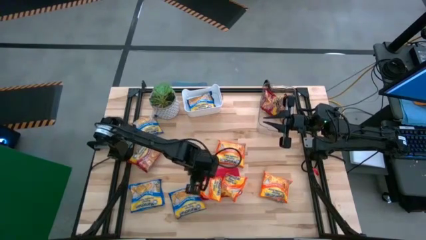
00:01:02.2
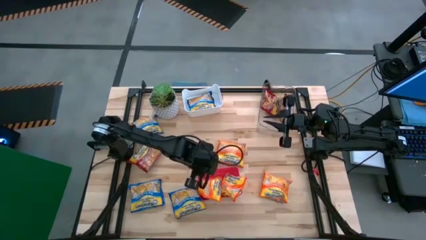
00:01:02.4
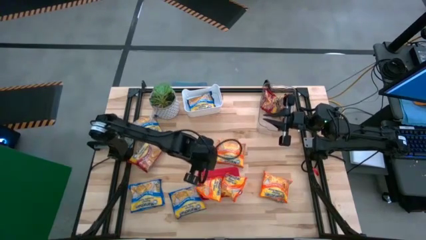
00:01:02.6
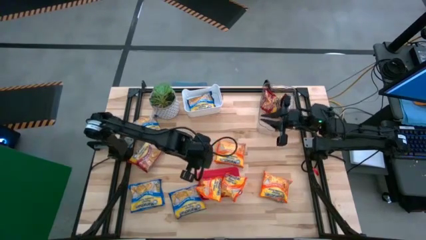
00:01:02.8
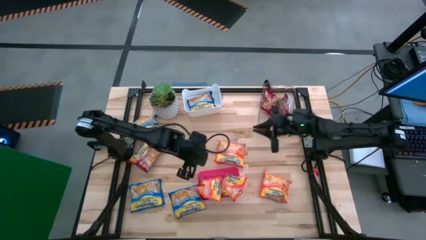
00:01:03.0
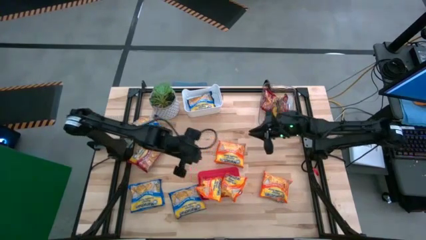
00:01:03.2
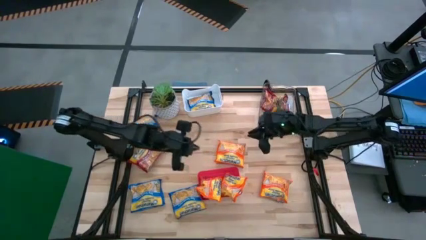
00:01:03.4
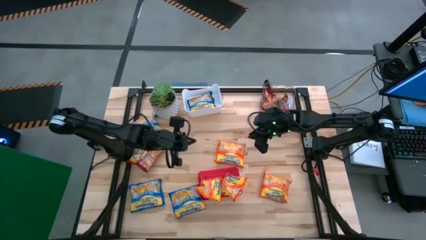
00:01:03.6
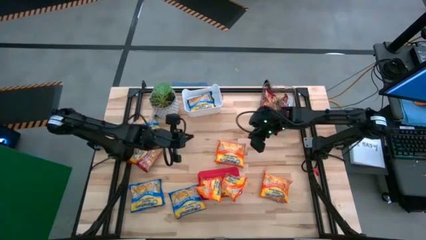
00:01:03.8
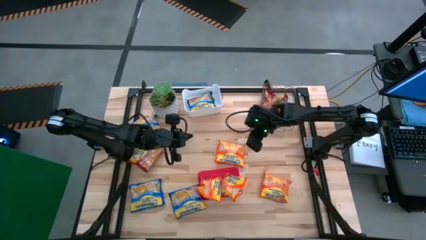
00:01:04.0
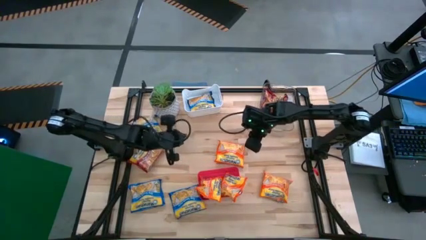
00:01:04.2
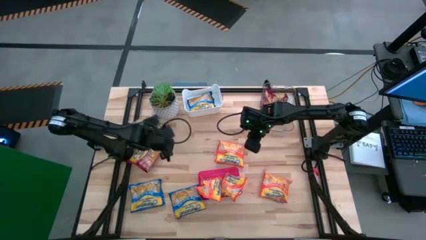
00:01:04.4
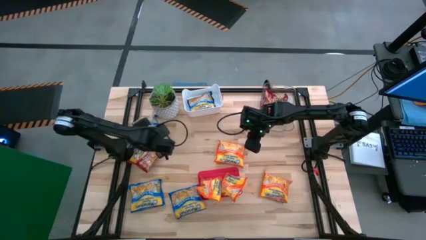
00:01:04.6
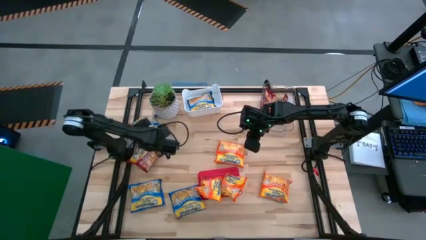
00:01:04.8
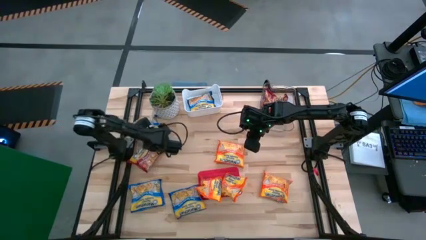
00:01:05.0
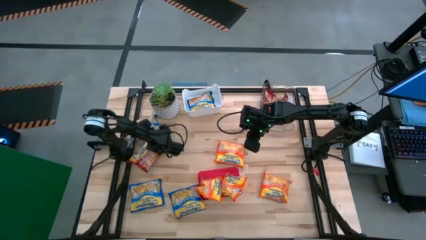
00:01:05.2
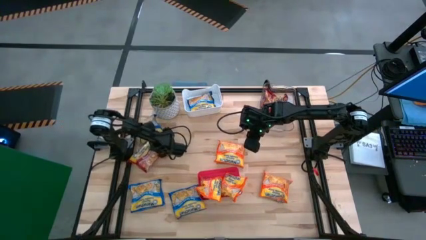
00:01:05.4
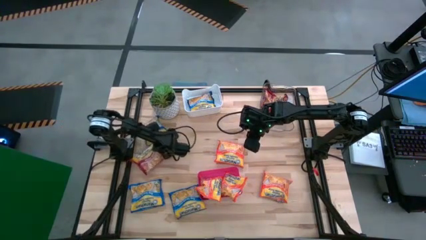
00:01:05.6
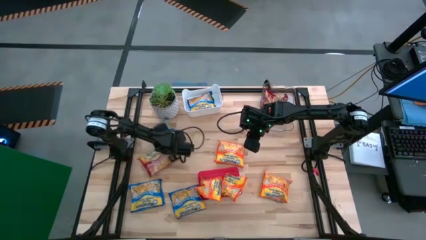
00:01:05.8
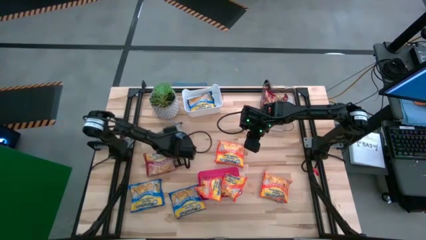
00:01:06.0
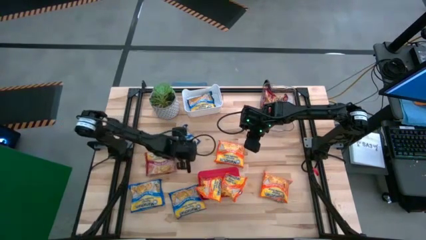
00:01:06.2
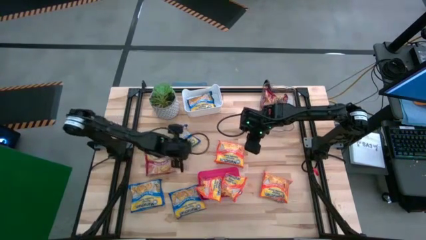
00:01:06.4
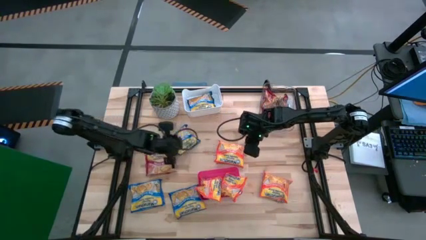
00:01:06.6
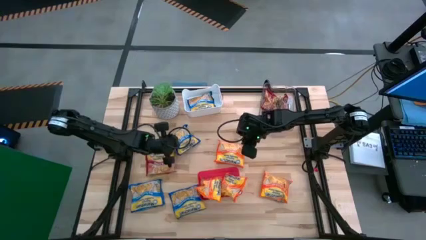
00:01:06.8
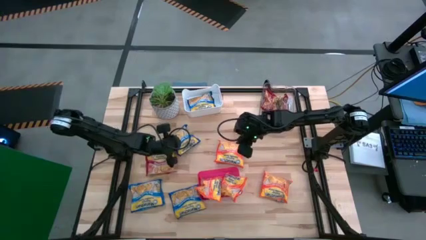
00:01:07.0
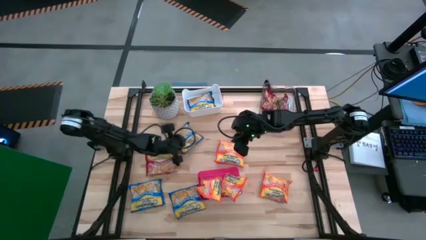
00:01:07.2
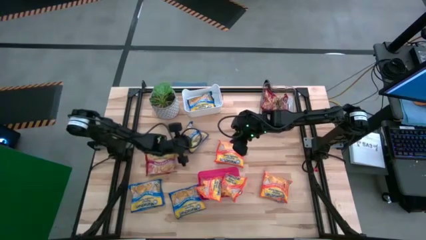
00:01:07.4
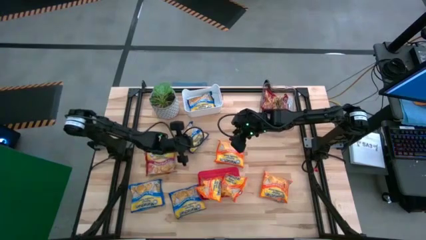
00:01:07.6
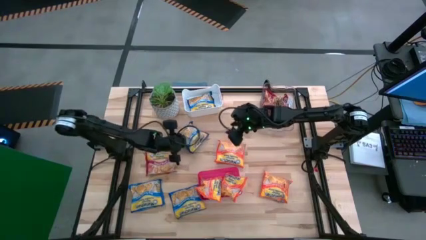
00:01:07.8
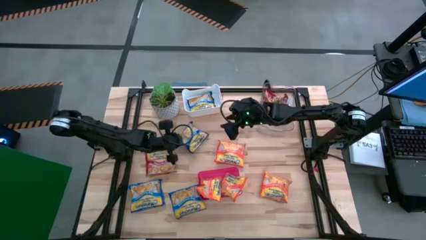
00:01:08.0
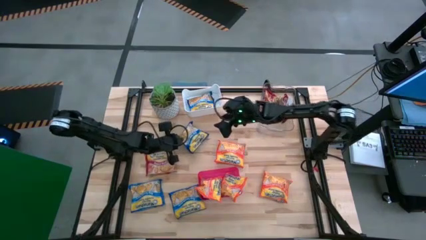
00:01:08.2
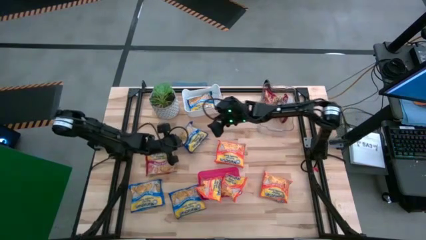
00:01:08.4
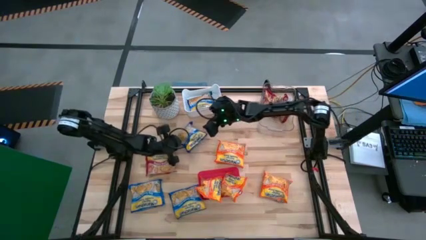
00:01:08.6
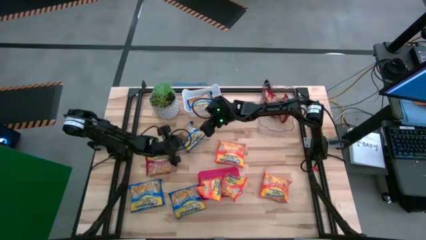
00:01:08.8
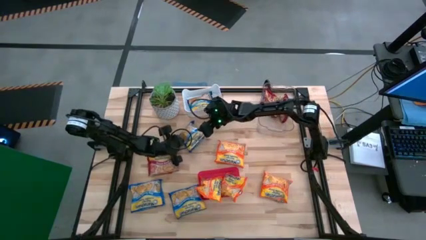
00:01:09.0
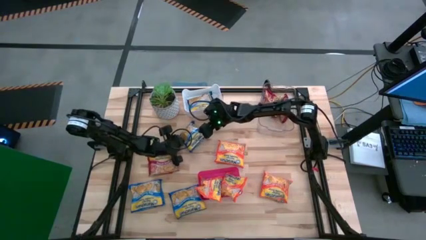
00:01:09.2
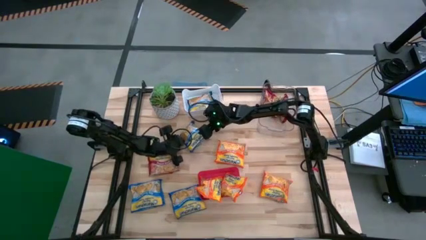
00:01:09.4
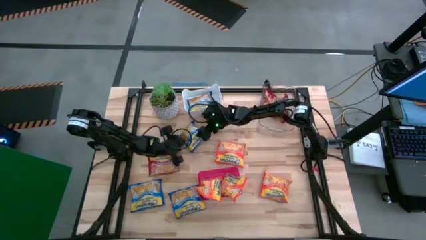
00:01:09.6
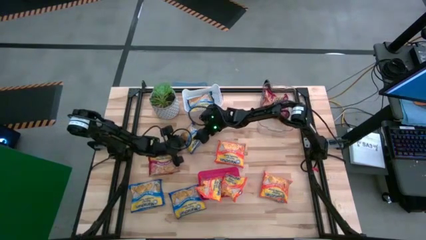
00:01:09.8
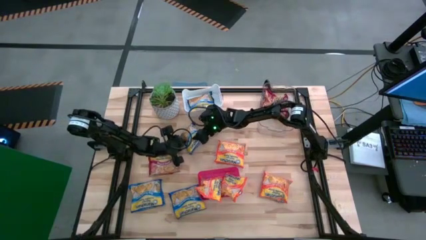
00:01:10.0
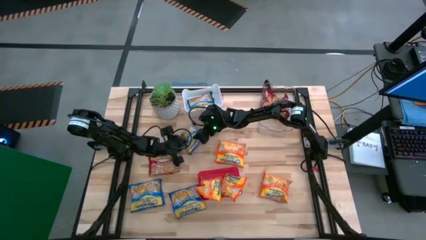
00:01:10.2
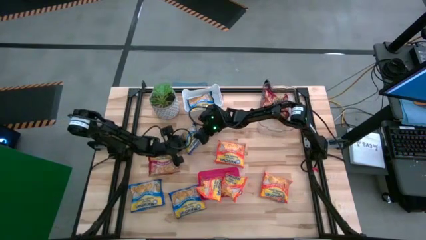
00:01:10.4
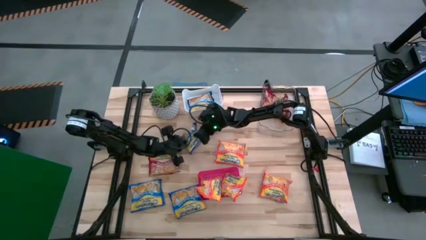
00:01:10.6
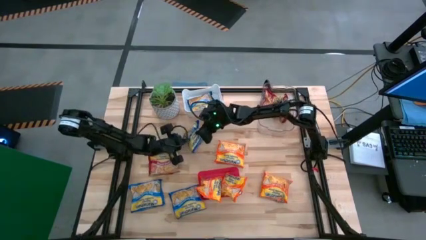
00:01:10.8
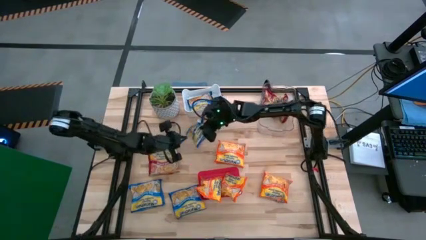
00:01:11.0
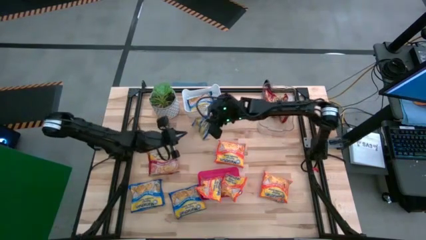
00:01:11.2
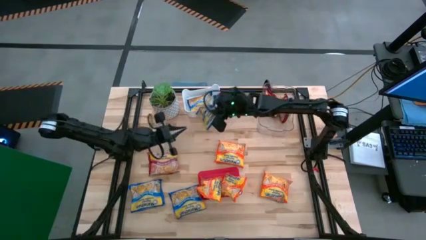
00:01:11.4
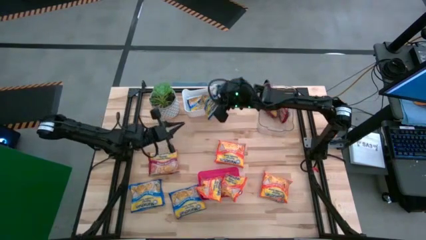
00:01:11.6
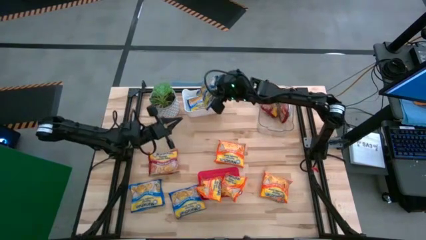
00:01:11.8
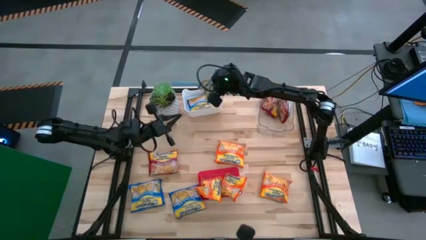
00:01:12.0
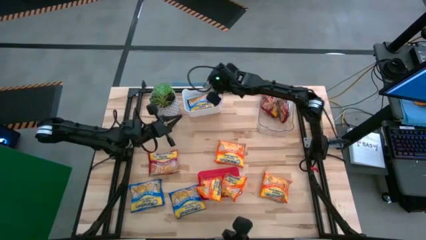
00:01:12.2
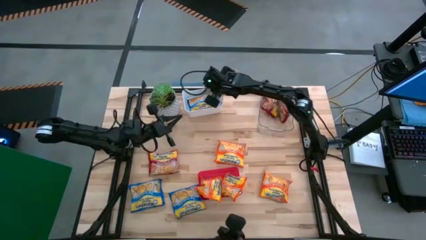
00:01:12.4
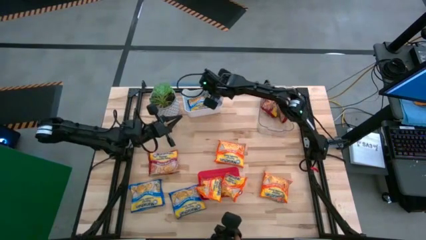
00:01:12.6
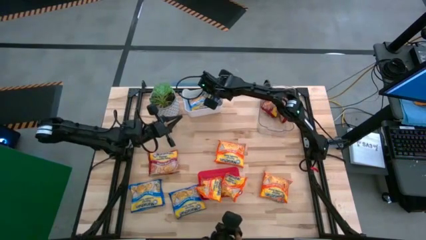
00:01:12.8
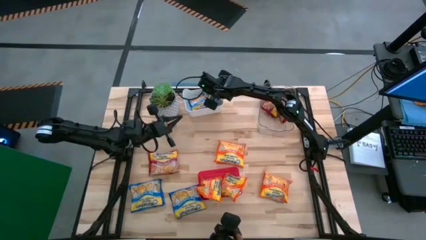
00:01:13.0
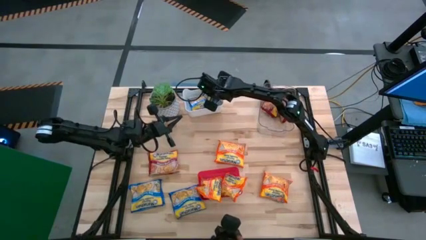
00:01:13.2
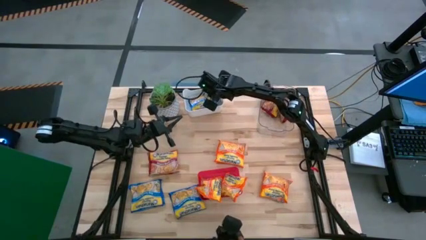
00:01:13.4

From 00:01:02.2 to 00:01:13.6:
Task: Sort Maruchan noodles
Put the blue noodle pack into the white bin

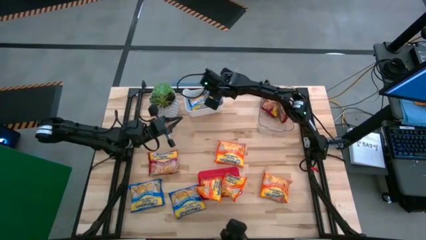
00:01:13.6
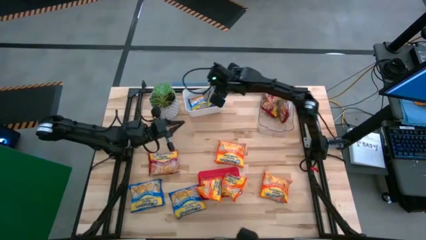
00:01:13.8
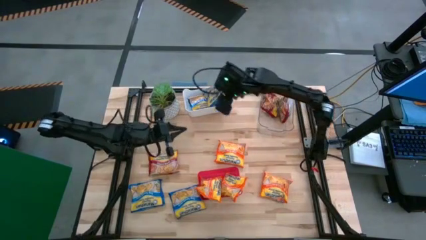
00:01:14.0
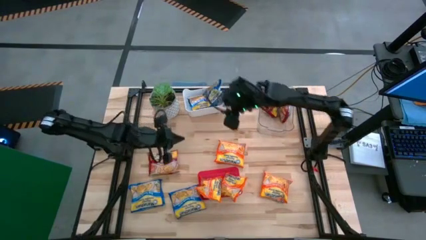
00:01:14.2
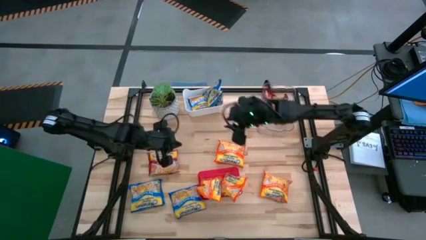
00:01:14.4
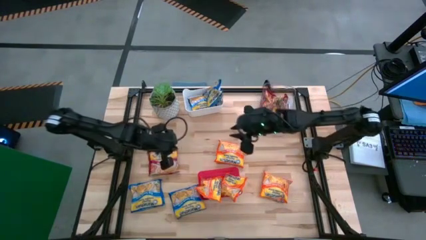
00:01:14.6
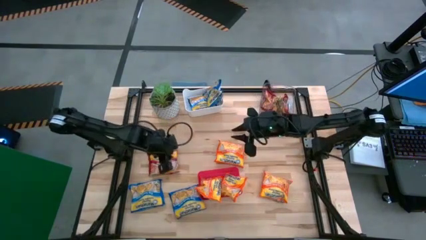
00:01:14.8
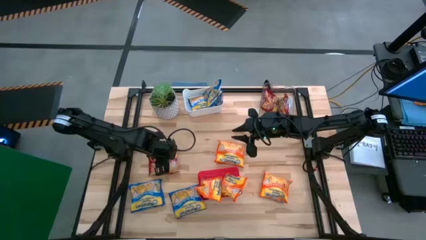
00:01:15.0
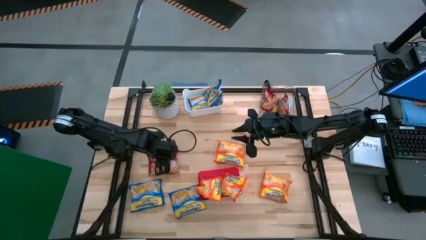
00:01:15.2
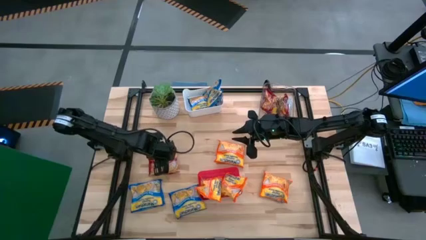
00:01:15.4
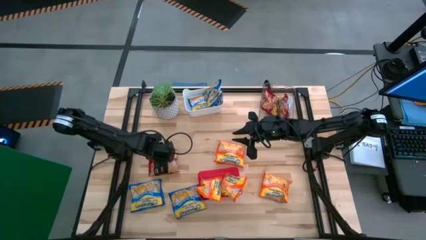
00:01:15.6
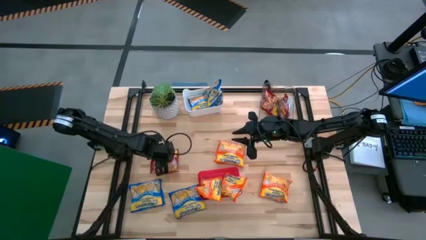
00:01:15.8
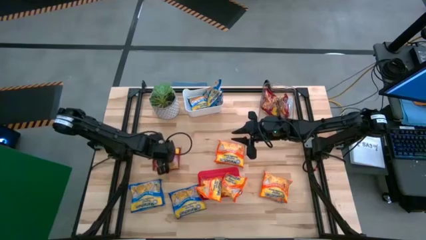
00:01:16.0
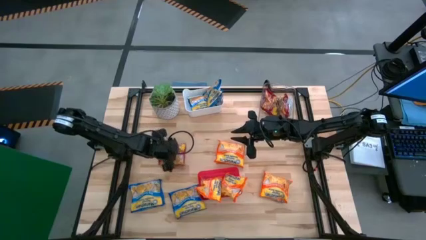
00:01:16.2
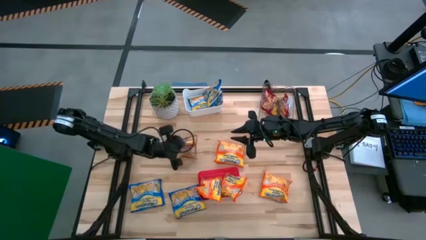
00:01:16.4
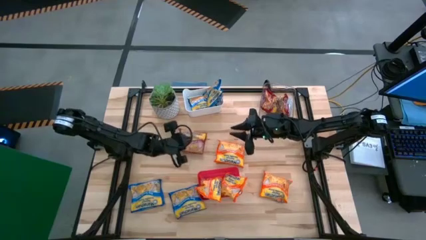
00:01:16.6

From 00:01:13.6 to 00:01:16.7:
Put the red noodle pack into the transparent bin

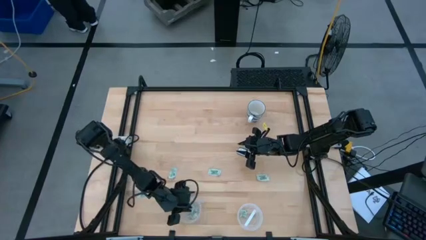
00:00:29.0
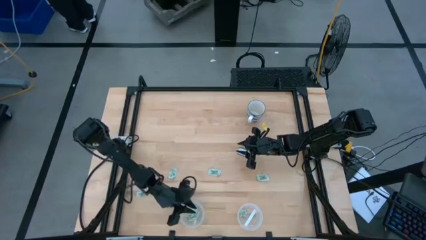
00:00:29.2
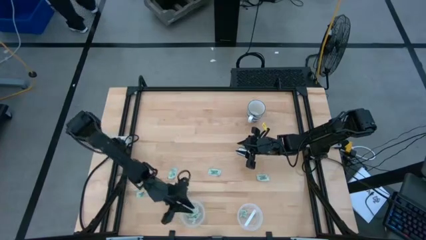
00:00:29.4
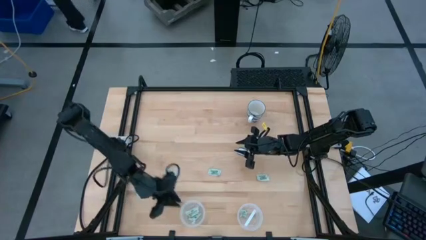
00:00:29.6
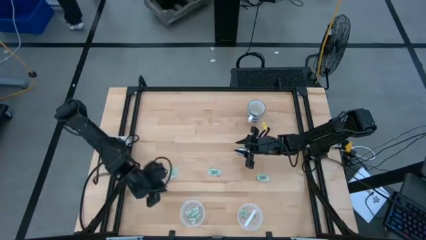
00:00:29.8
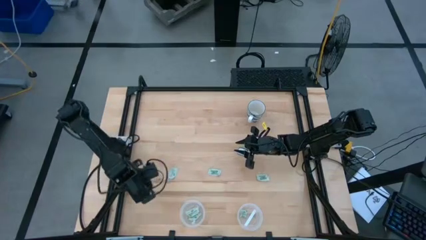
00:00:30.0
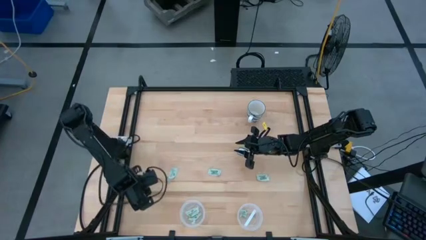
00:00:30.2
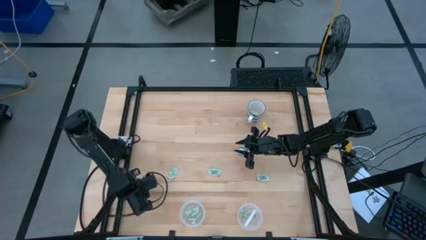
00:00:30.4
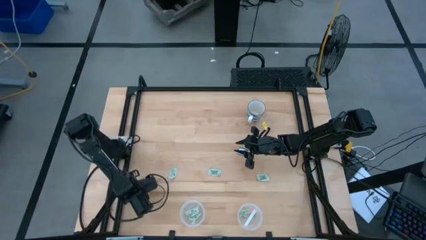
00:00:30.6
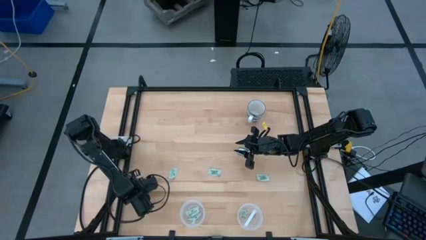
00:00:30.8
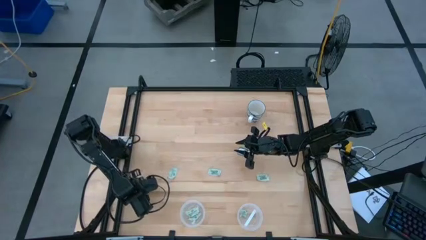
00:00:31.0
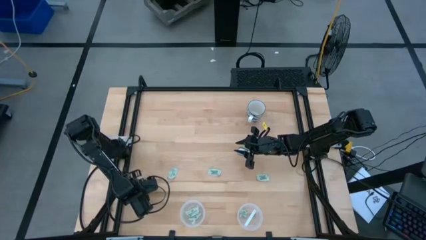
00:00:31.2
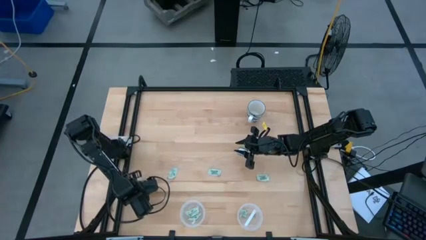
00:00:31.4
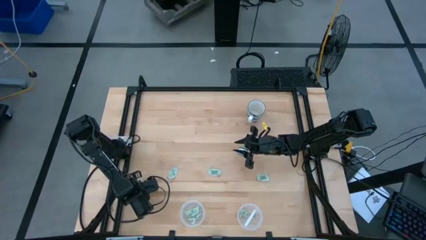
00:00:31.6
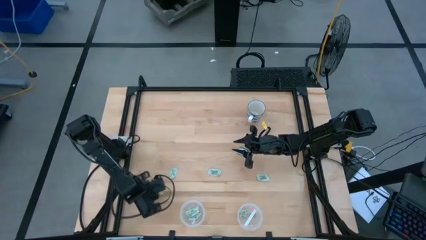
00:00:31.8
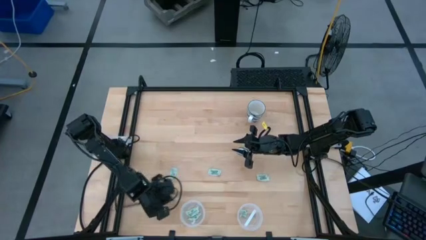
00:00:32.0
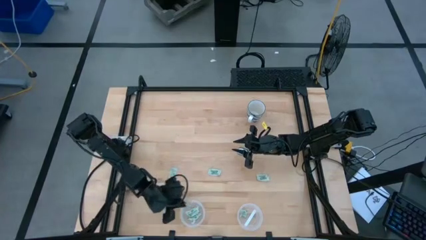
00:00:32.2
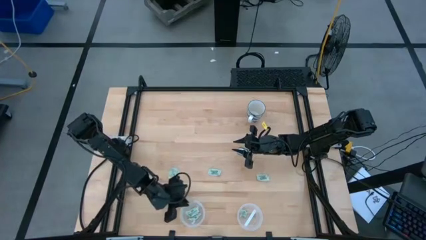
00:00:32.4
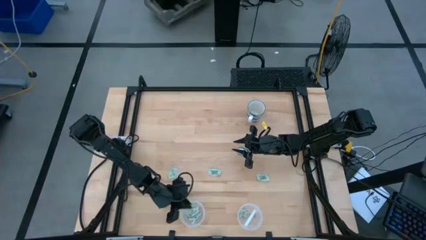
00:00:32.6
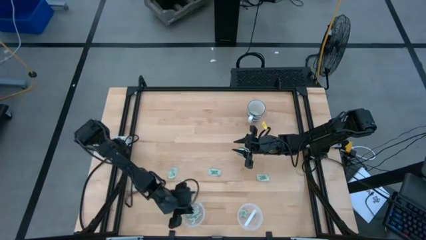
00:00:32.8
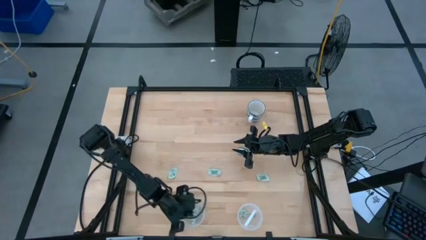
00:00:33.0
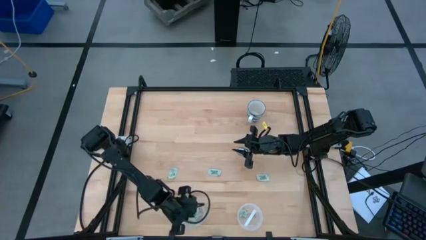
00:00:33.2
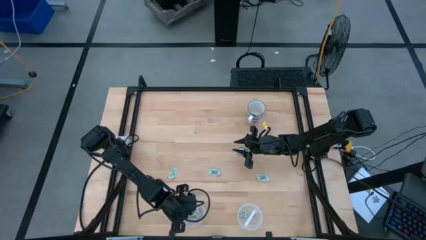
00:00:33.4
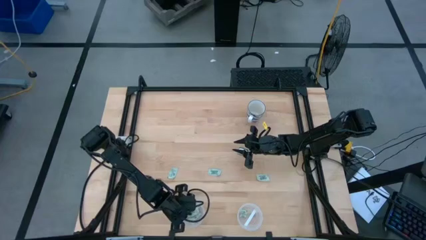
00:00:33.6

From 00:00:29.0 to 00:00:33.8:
Task: Pick and place Stevia / Truvia into bins
Put the white stevia packet into the left transparent container
